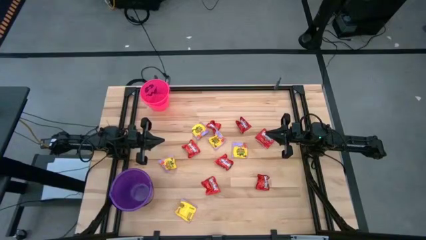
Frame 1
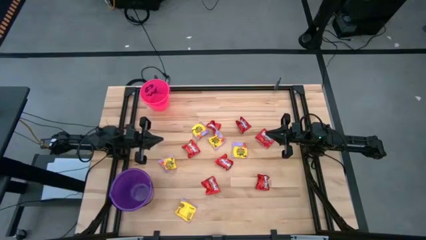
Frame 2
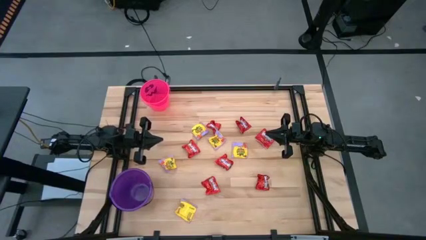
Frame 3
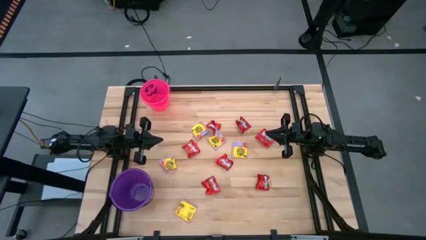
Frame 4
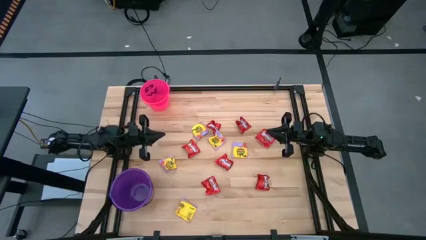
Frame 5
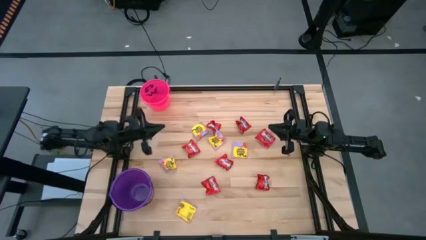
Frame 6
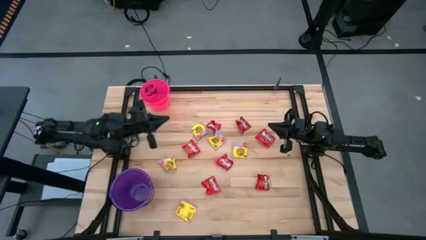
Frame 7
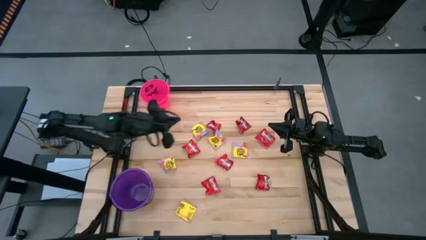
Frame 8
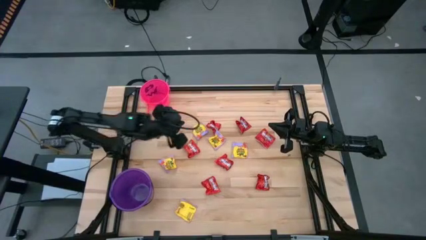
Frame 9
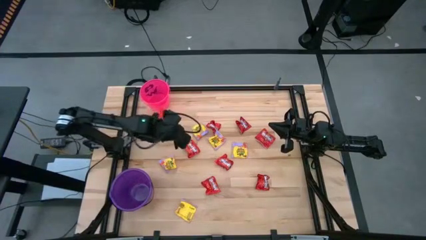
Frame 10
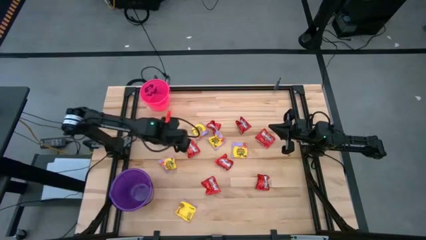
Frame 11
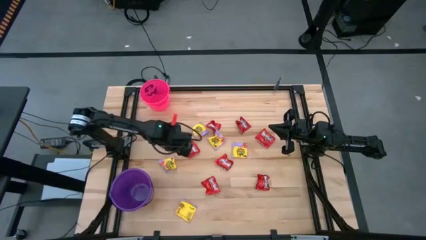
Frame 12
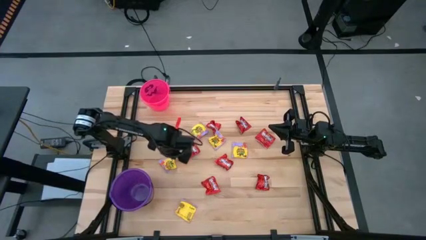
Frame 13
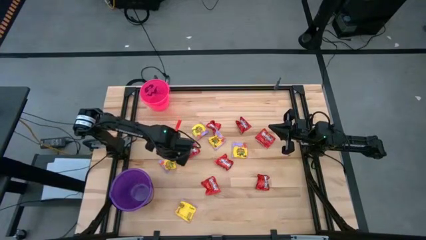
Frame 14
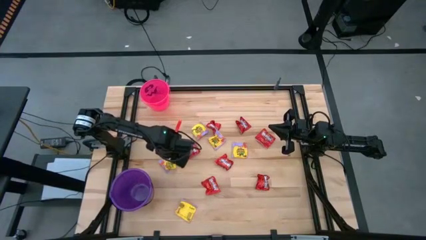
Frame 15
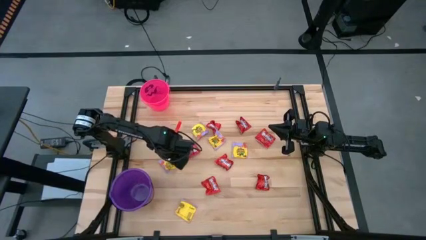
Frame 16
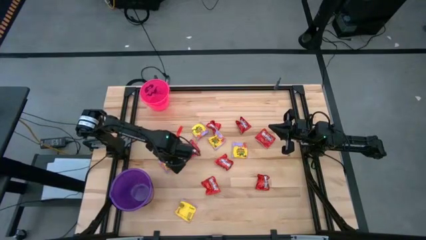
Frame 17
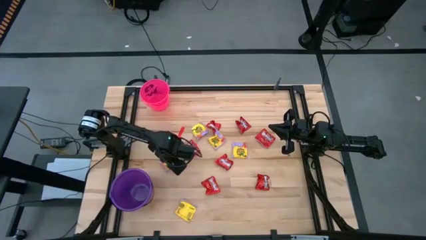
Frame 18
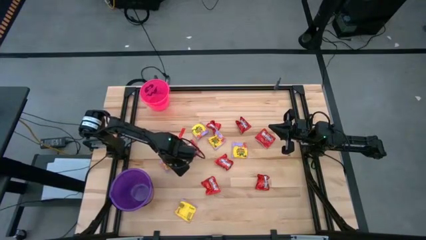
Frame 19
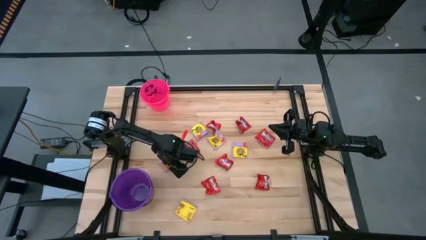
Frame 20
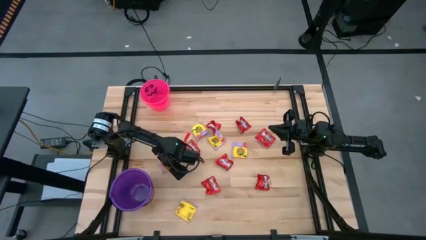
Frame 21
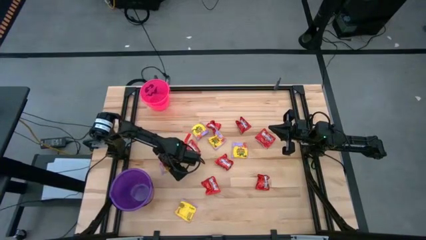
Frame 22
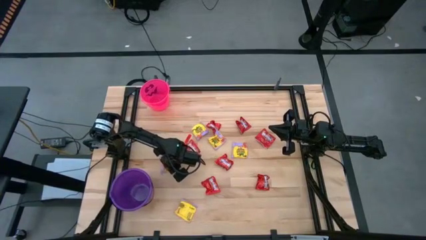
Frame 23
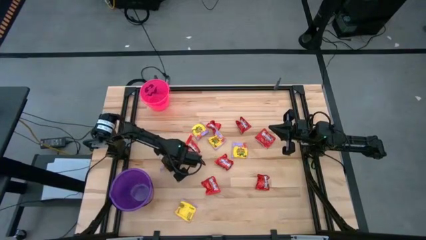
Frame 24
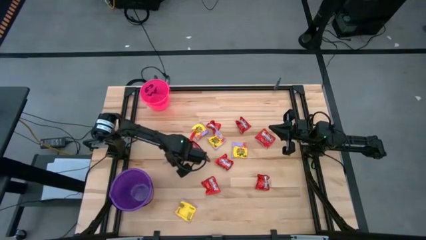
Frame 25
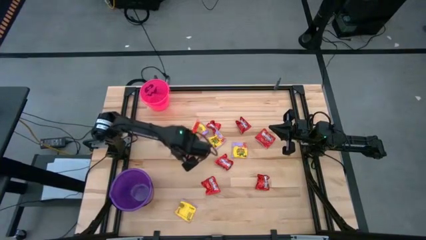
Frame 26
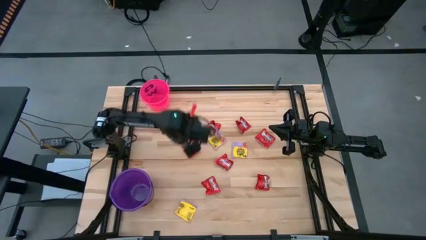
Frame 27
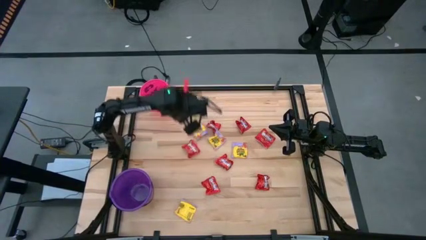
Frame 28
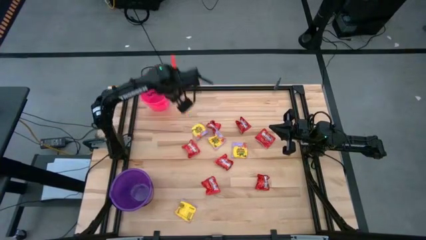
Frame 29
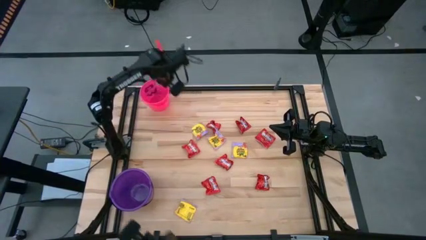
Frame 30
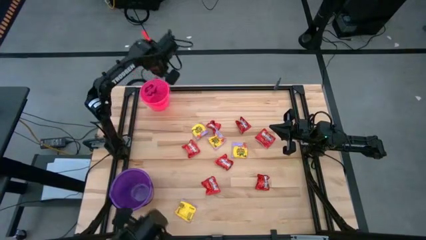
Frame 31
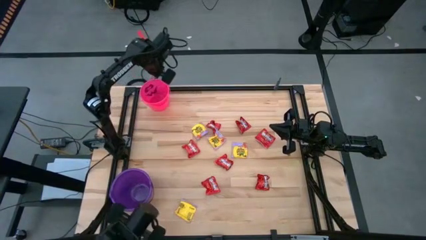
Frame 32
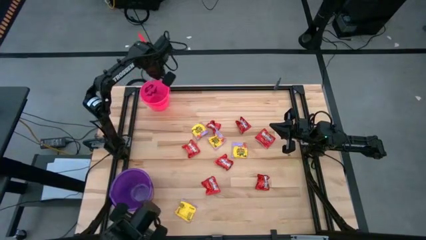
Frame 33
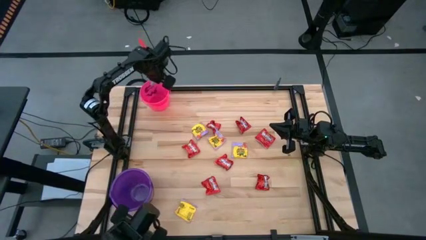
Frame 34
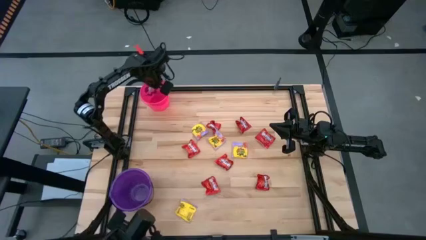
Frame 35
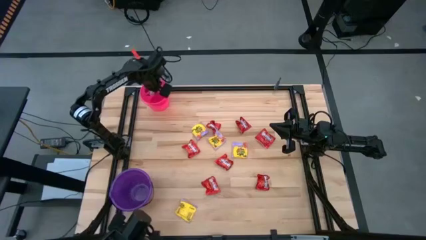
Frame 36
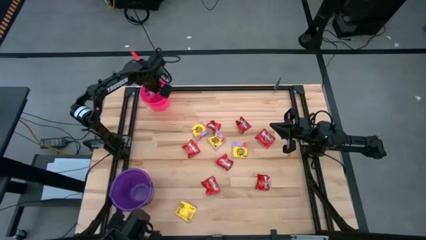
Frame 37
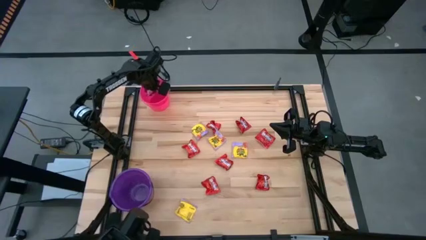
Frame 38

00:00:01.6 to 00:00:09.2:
Task: Sort candy by brand, put in halloween buckets
Put the yellow candy into the pink bucket

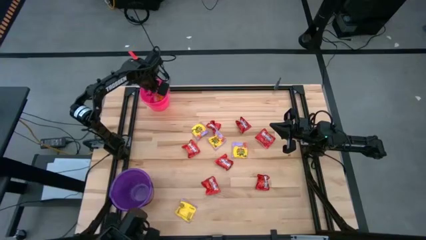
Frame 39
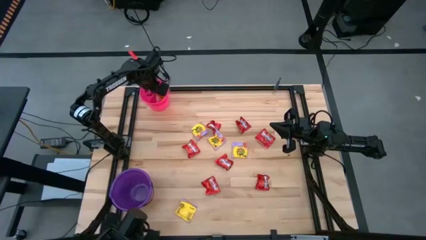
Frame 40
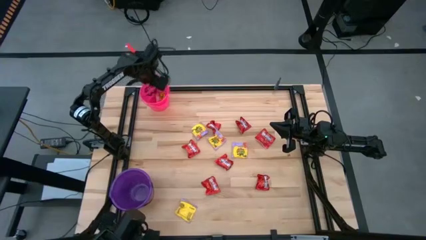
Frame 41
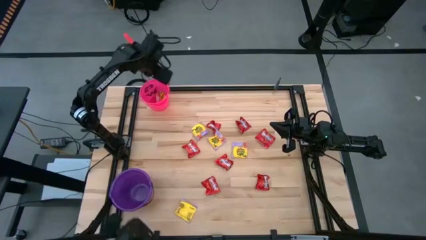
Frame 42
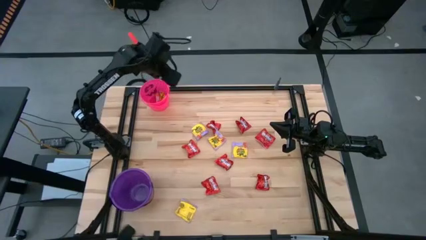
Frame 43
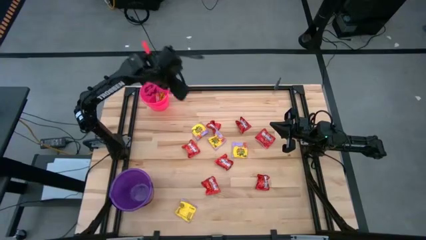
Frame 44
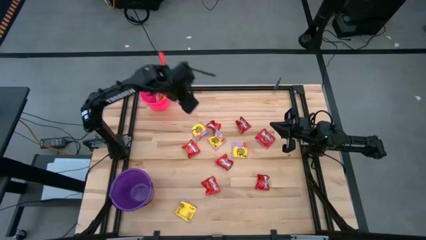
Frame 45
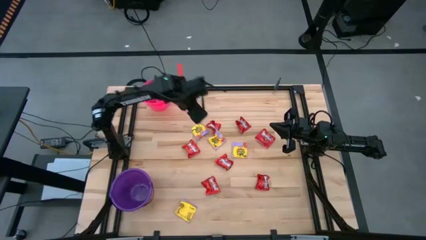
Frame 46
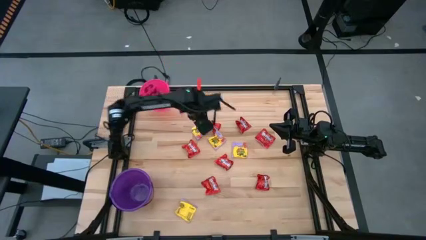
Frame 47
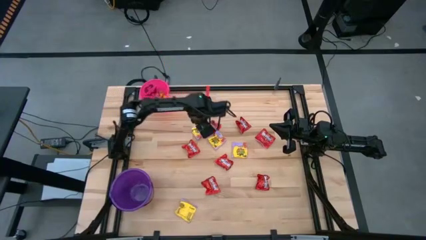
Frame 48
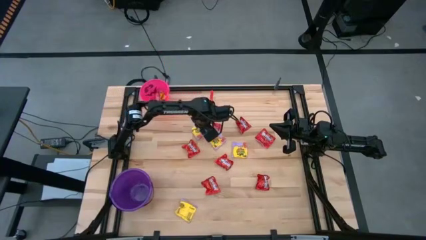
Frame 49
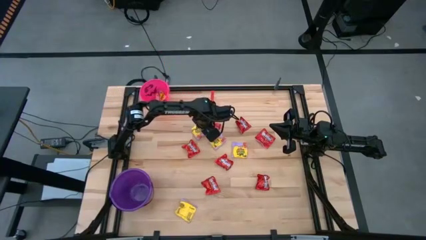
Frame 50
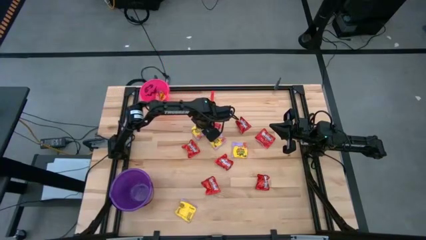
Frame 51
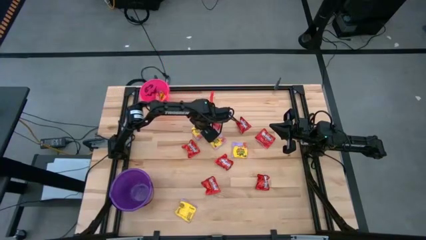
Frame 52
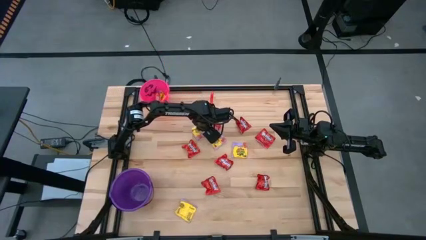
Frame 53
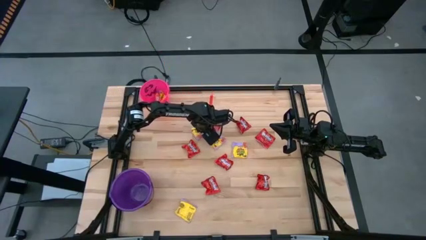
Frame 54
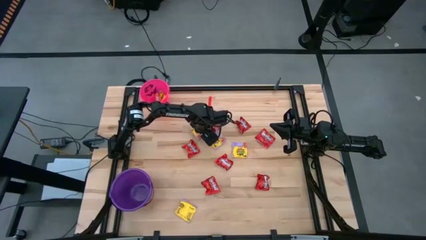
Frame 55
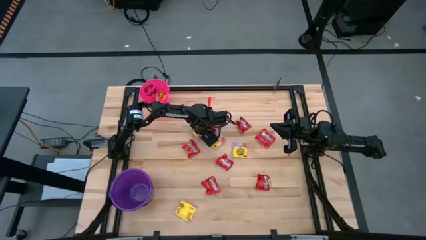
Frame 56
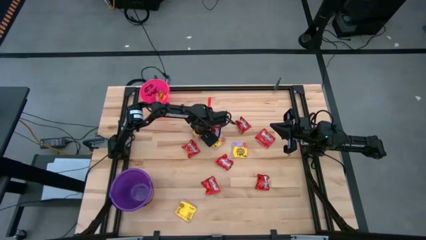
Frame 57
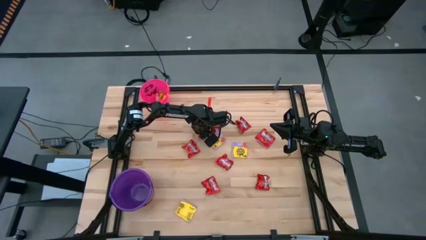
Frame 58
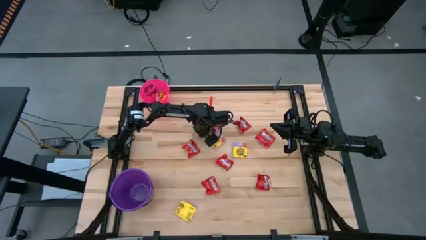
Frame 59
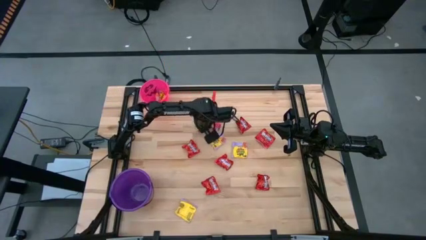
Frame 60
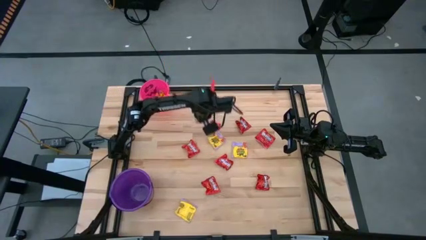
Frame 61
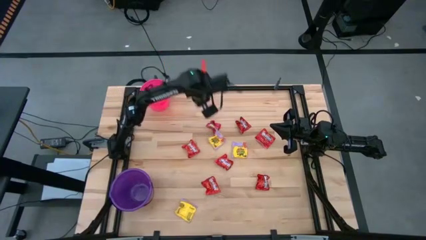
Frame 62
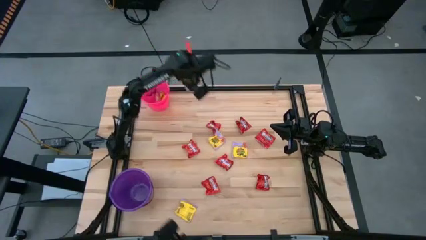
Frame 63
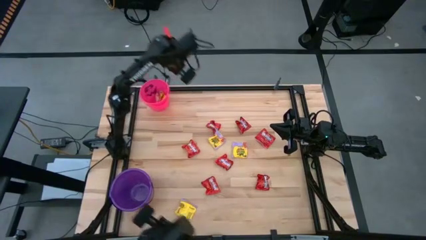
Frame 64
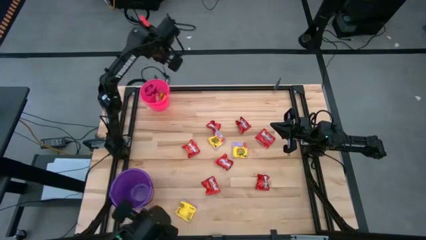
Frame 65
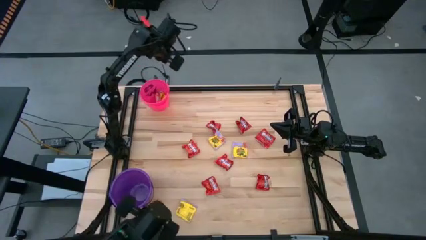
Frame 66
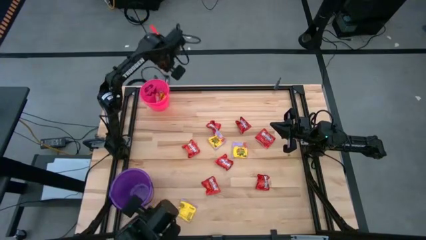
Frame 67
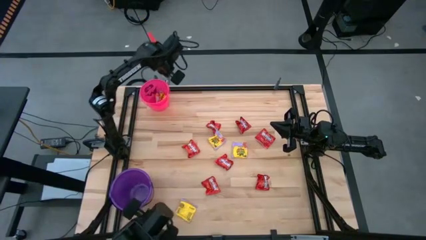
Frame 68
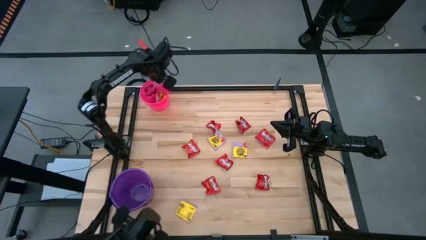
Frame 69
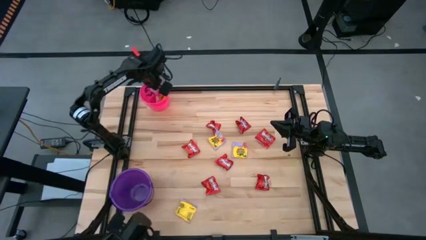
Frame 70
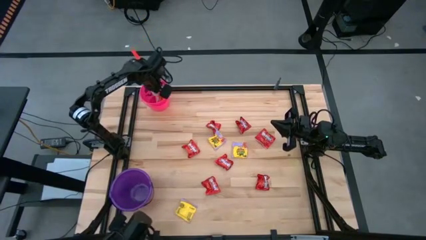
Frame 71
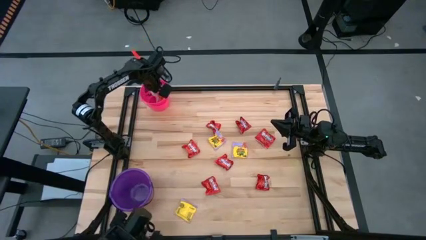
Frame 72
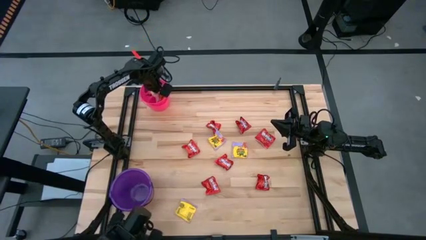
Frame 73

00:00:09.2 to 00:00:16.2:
Put the yellow candy into the pink bucket
